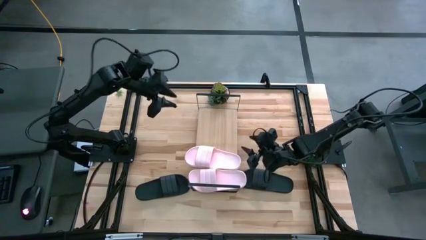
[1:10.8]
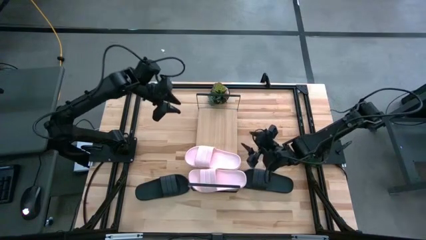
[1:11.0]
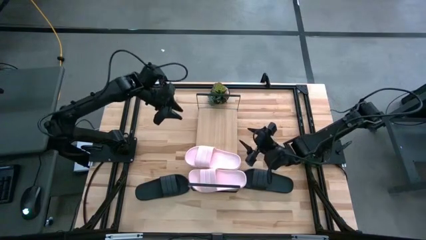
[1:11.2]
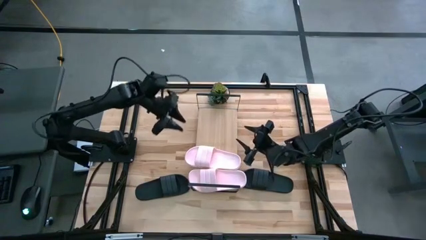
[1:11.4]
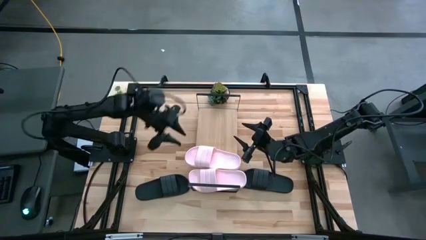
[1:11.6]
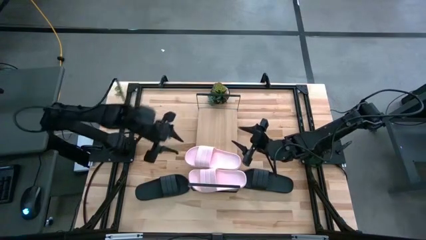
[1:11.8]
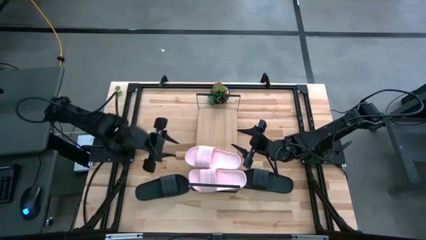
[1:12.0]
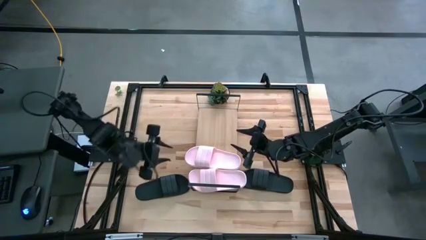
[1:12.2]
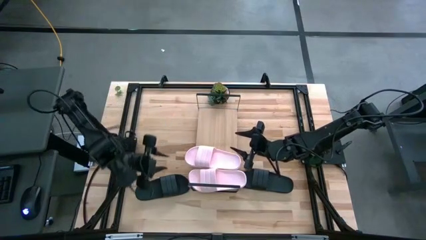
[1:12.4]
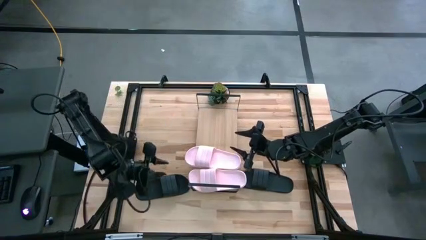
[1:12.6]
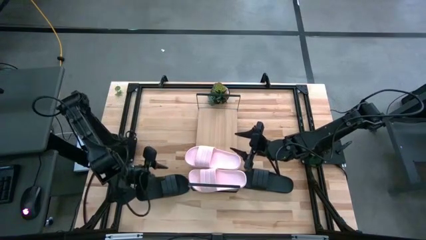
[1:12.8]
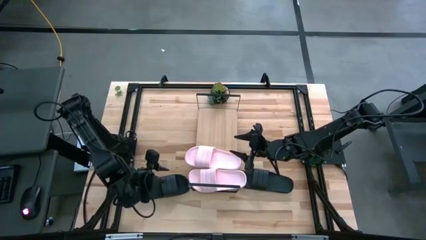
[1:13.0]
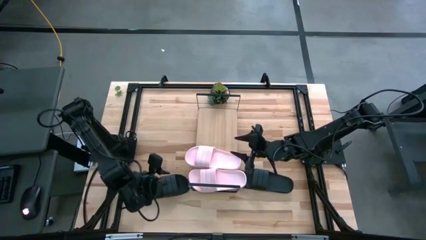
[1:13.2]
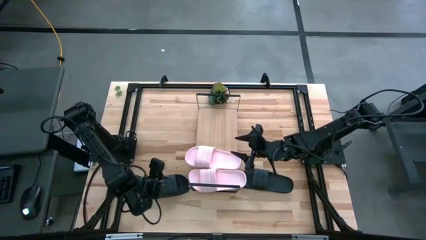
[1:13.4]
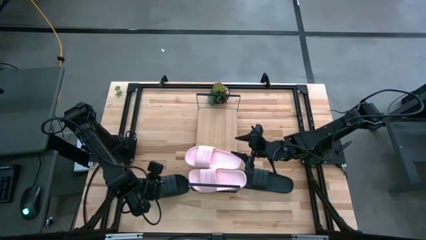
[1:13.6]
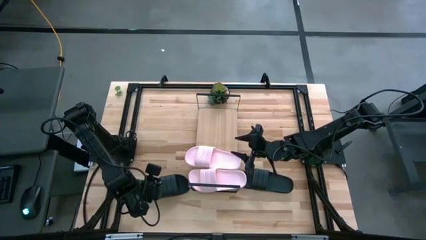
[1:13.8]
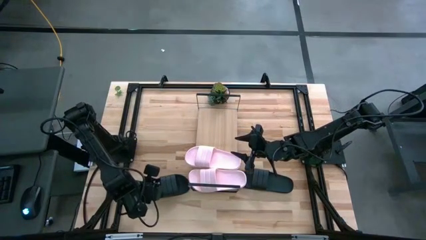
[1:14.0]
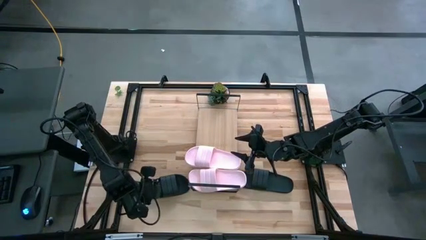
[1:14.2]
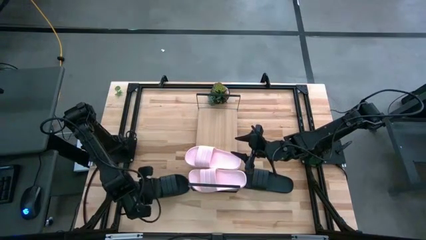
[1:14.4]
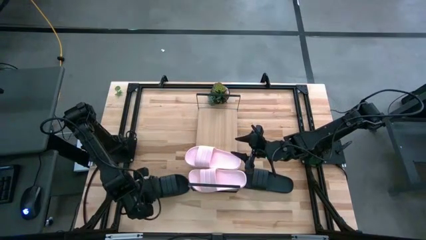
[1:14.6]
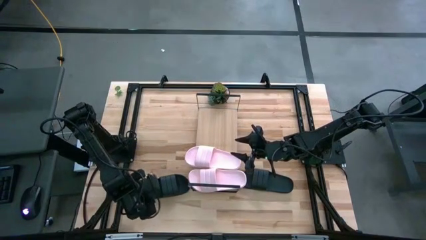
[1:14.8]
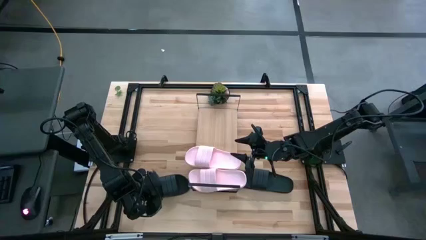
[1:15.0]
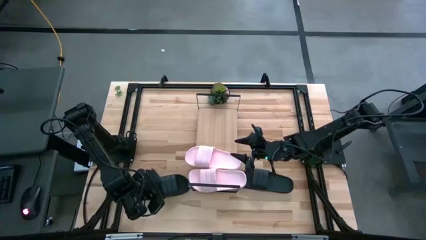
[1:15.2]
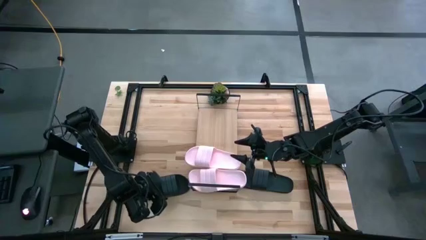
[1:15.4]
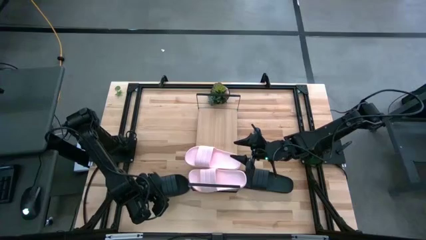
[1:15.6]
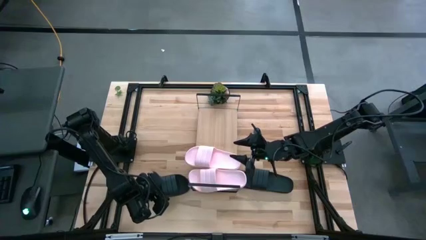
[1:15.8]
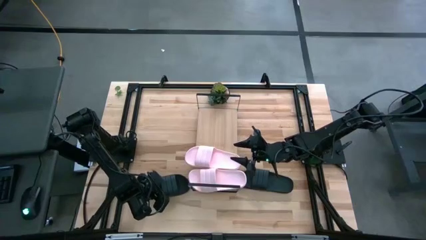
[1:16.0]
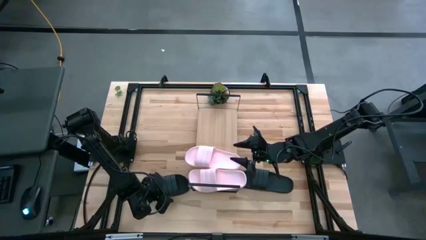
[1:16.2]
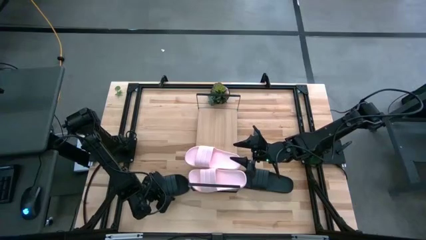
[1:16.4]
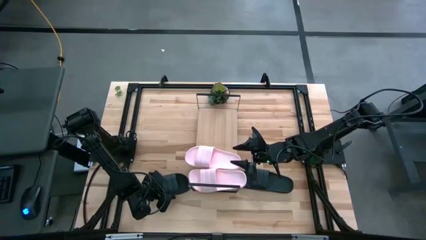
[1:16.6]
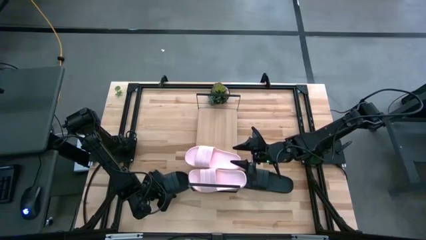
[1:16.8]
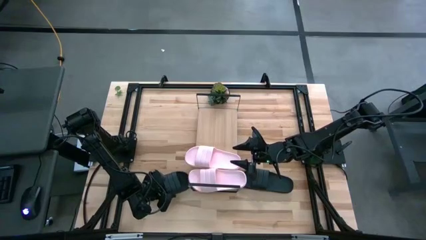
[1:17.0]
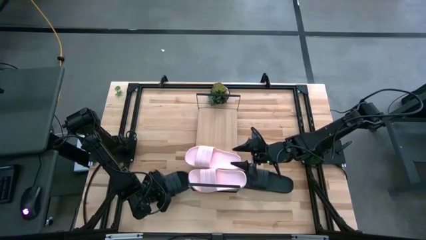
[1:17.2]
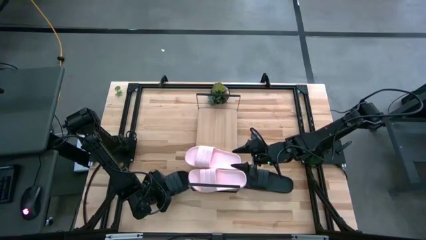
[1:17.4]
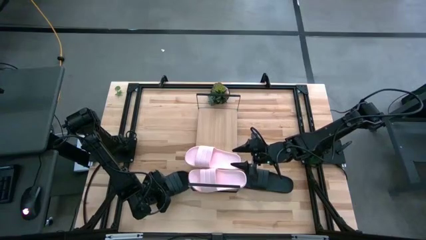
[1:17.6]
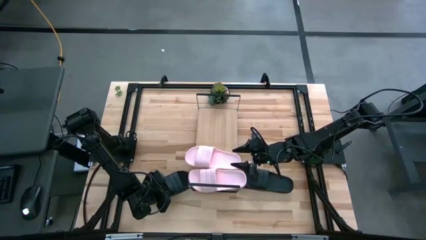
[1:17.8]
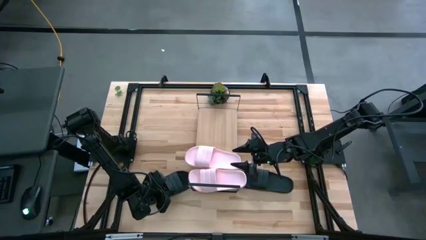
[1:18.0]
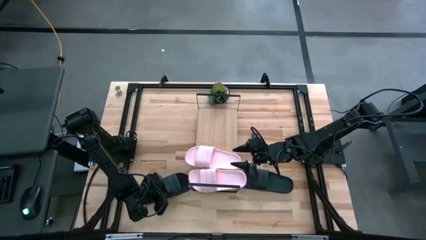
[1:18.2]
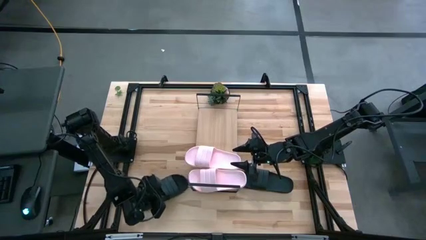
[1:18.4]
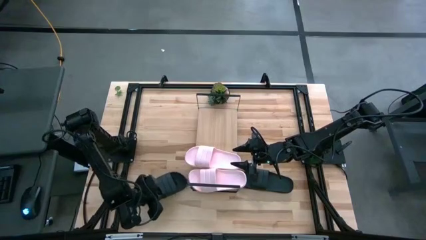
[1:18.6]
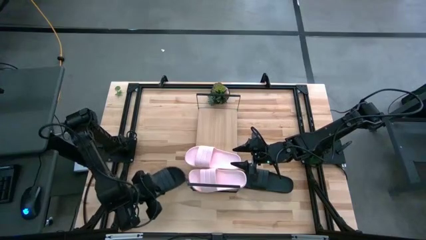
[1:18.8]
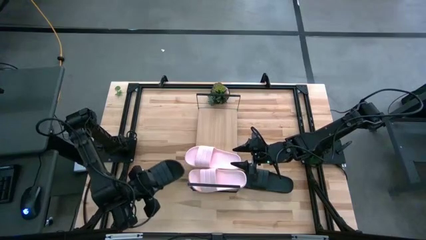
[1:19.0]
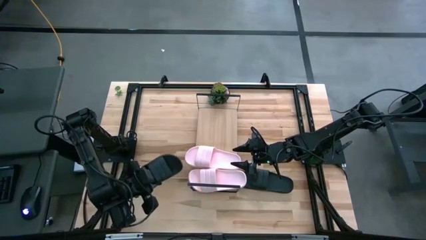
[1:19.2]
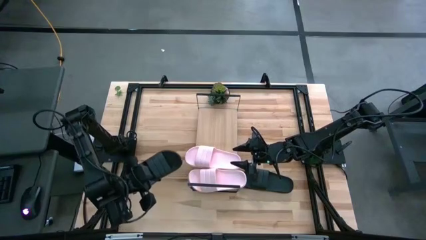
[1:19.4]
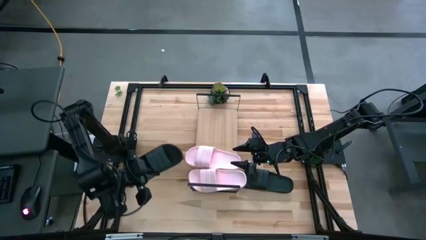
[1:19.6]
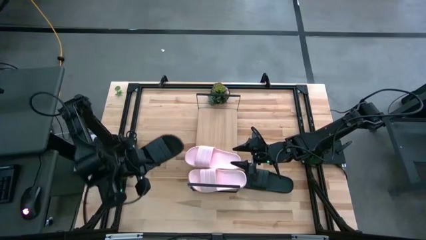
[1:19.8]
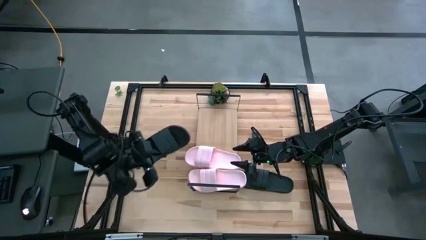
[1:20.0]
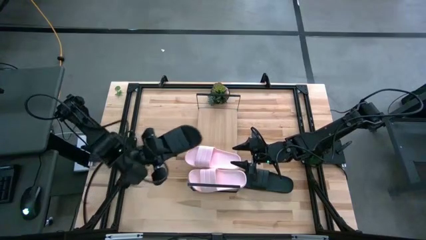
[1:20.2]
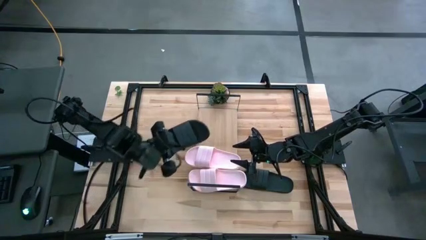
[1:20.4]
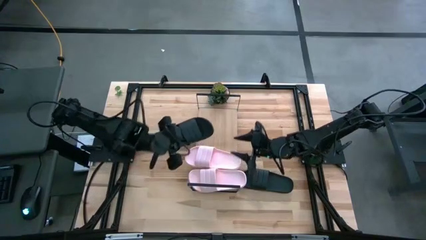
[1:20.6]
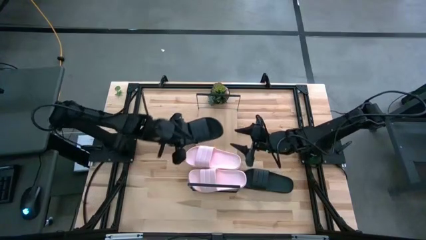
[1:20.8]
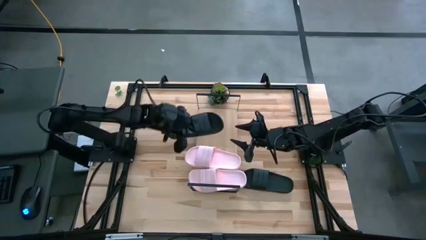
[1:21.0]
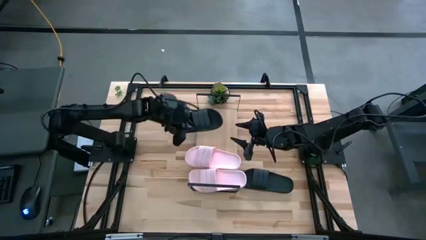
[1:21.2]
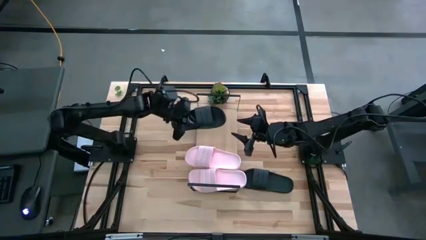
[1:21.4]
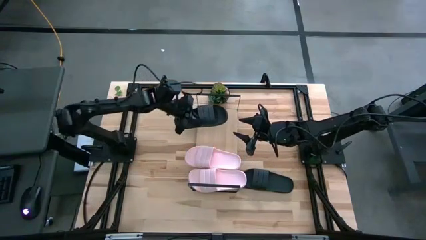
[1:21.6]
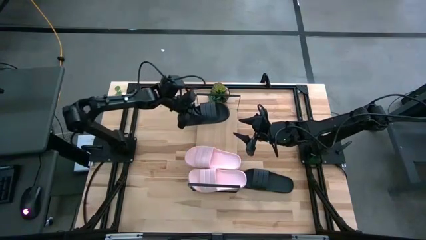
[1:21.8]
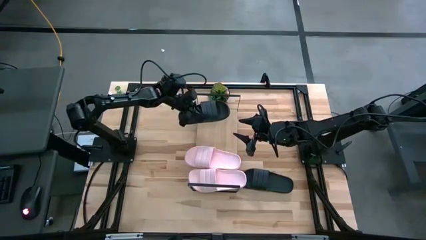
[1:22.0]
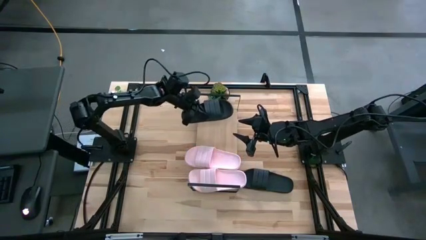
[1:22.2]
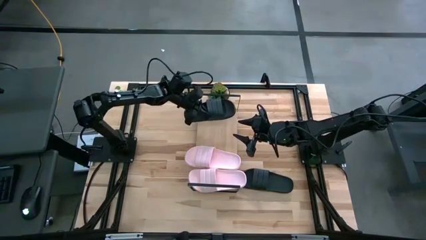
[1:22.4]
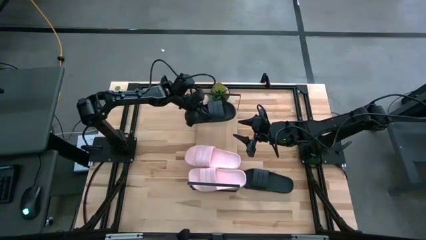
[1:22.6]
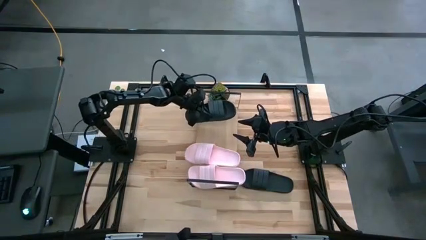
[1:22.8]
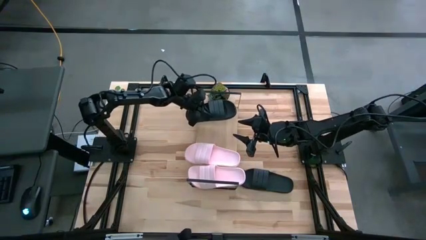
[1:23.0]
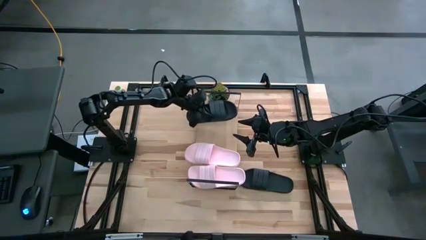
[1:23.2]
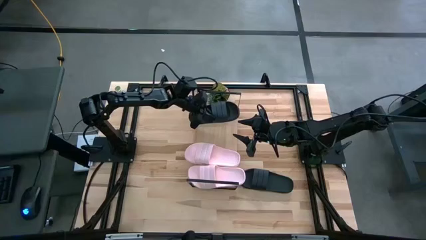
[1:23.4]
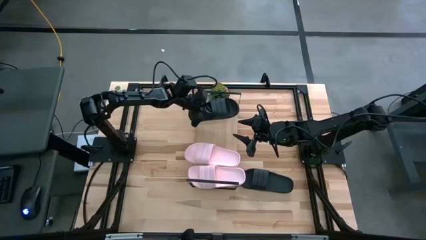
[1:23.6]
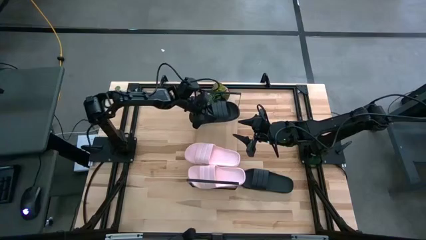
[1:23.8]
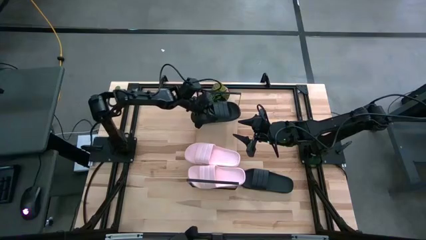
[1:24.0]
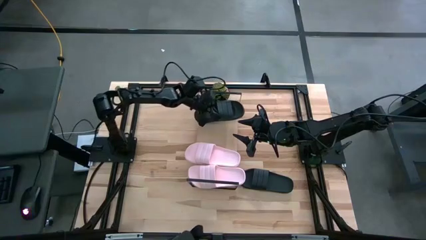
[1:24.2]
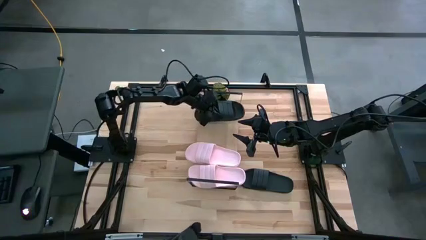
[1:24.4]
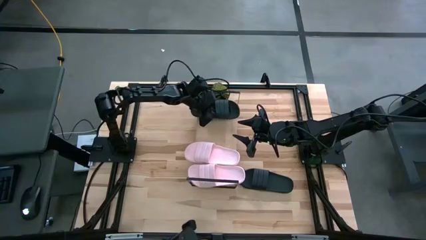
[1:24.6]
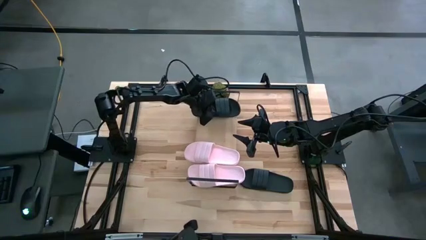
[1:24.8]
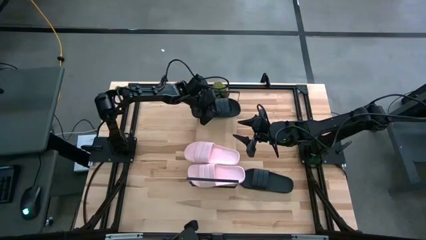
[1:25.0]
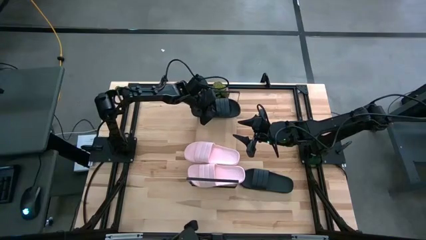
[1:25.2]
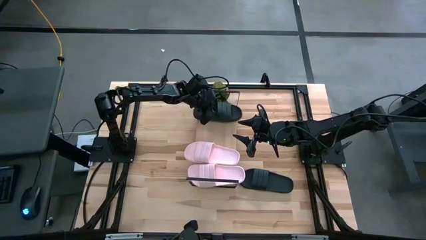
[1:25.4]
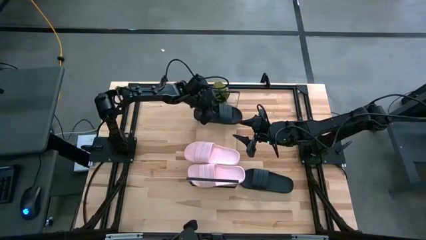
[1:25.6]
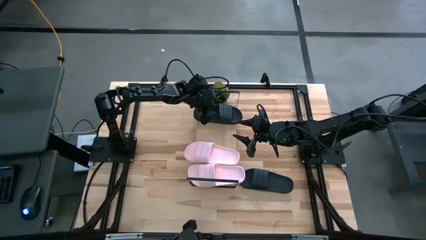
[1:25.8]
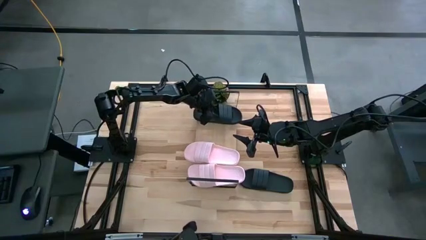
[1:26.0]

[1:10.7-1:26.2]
Task: Pick and place slides into the shelf
Put the left black slide on the shelf
